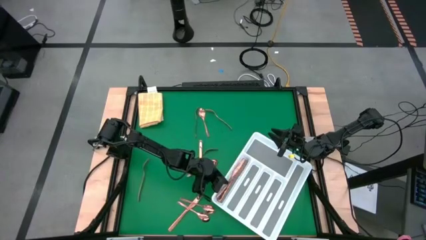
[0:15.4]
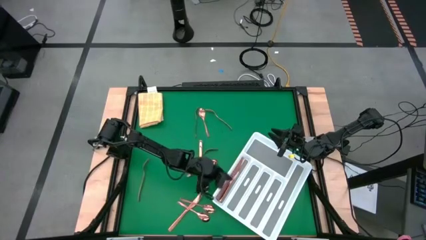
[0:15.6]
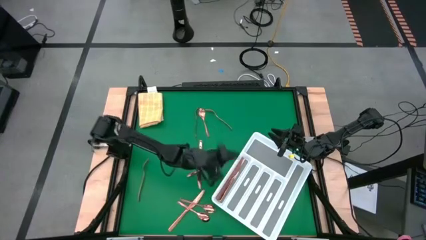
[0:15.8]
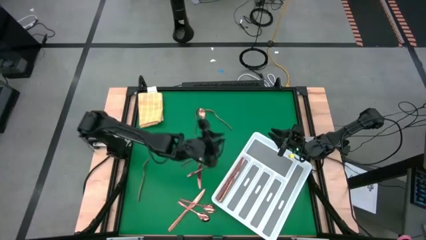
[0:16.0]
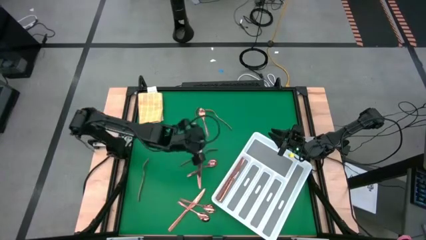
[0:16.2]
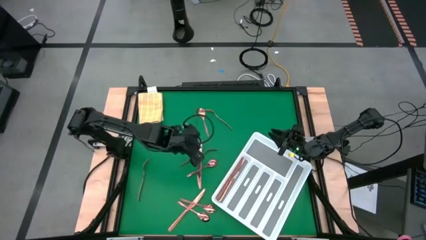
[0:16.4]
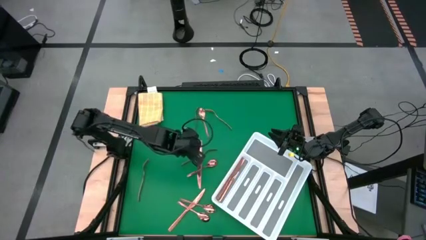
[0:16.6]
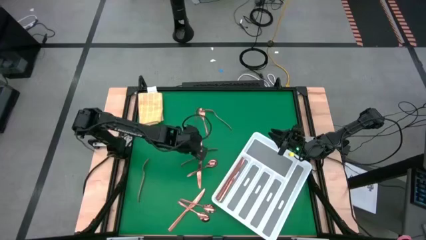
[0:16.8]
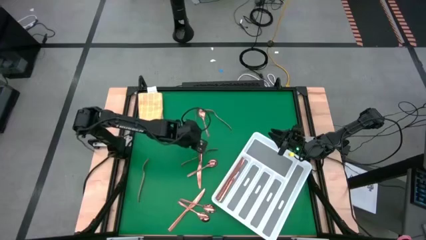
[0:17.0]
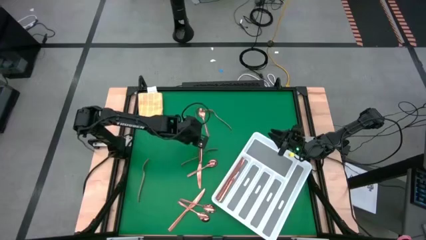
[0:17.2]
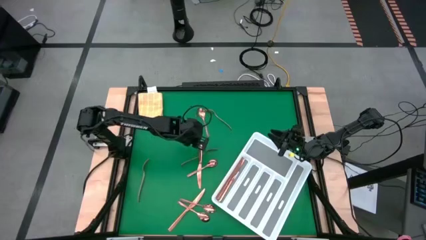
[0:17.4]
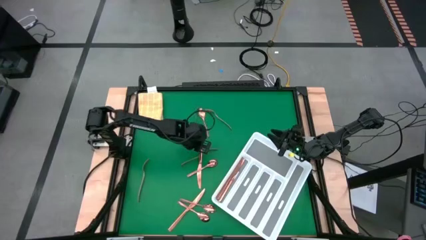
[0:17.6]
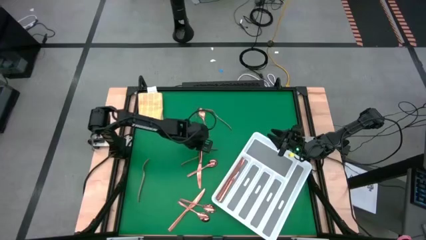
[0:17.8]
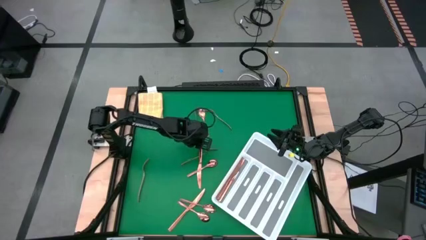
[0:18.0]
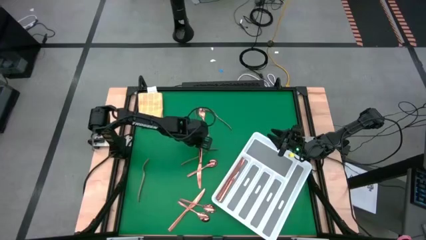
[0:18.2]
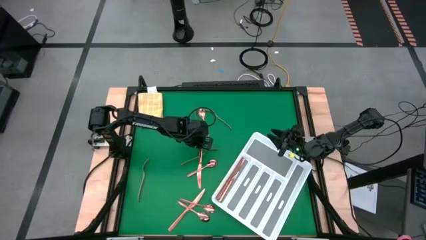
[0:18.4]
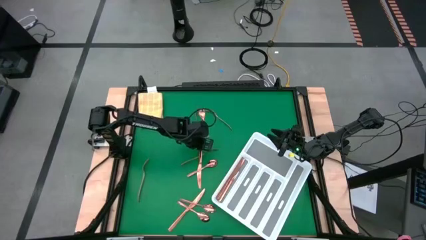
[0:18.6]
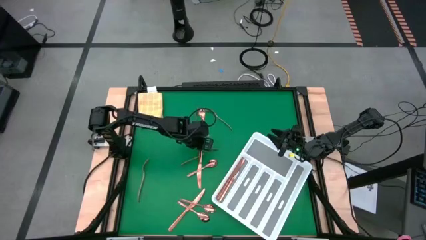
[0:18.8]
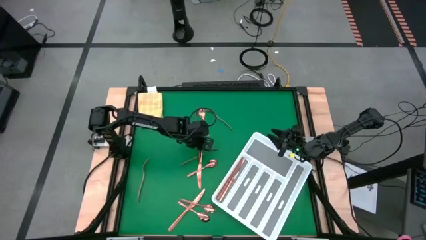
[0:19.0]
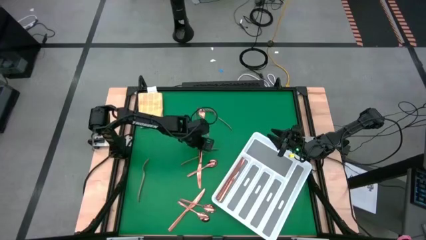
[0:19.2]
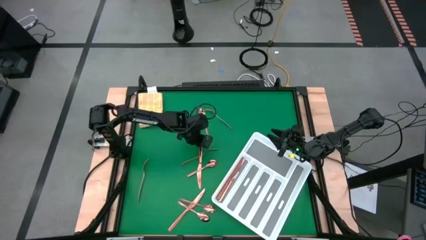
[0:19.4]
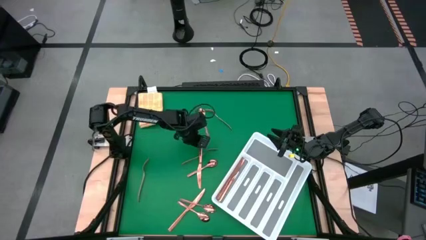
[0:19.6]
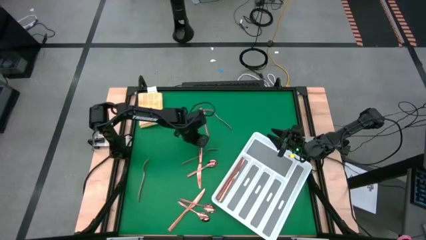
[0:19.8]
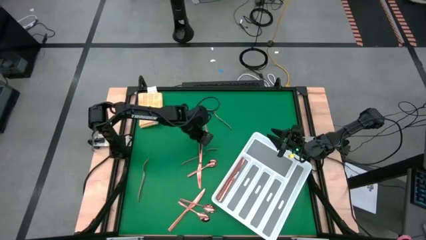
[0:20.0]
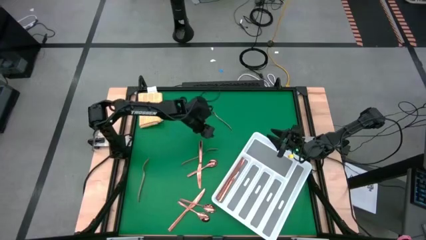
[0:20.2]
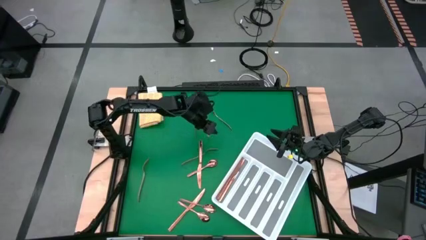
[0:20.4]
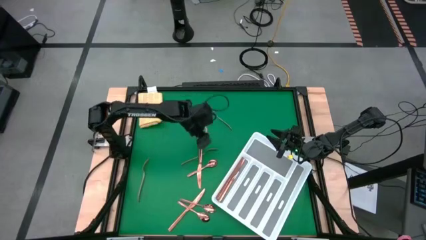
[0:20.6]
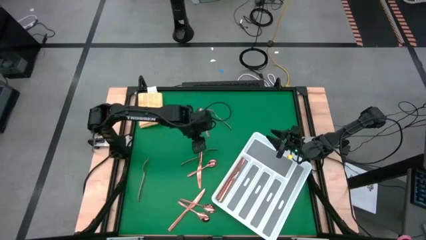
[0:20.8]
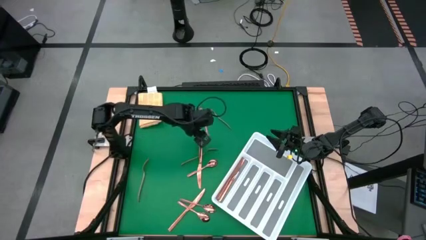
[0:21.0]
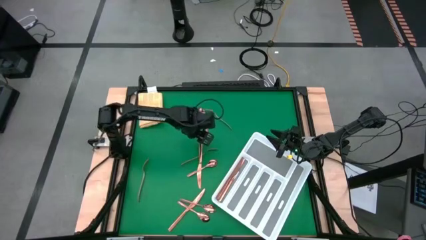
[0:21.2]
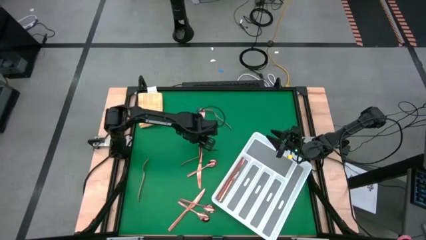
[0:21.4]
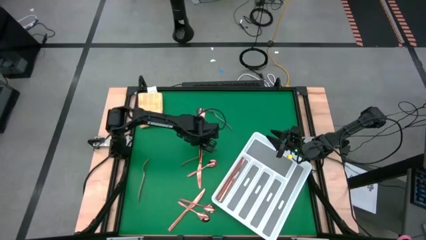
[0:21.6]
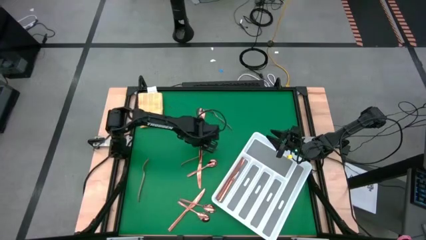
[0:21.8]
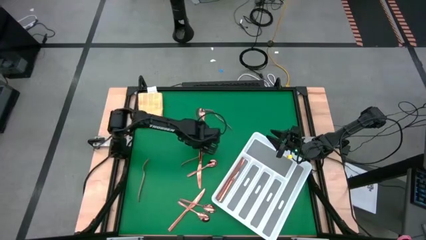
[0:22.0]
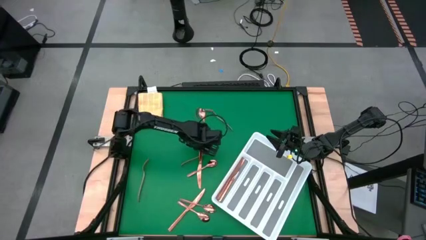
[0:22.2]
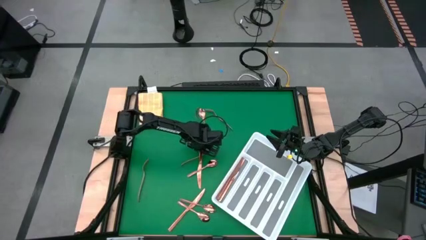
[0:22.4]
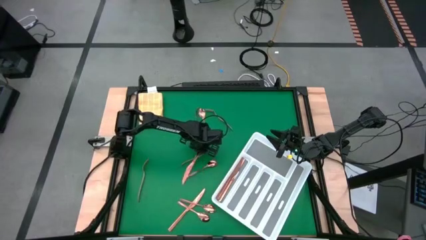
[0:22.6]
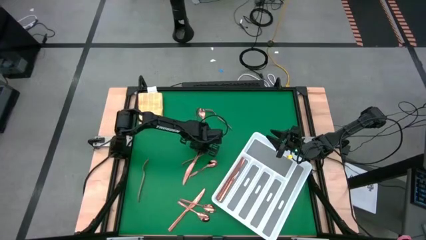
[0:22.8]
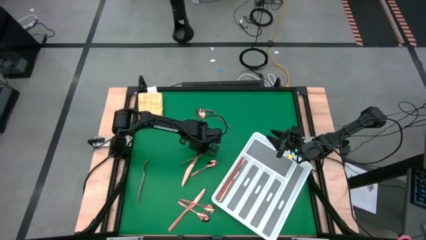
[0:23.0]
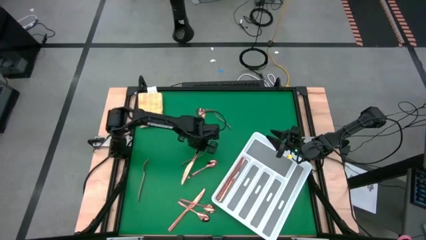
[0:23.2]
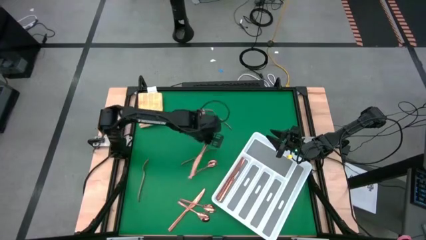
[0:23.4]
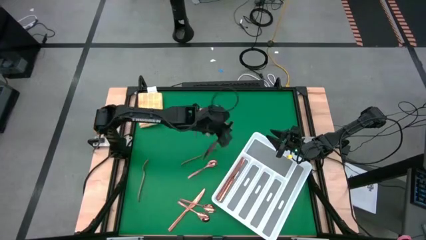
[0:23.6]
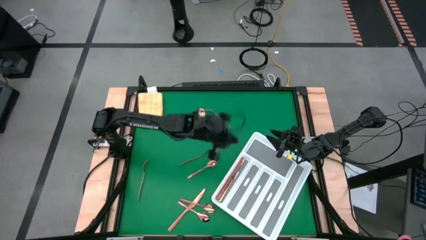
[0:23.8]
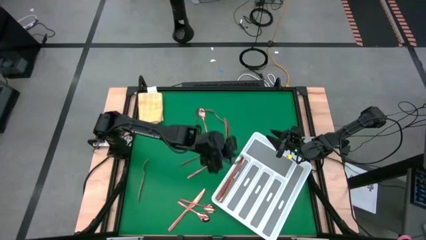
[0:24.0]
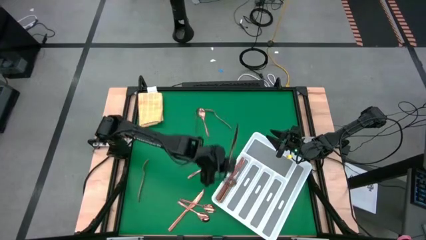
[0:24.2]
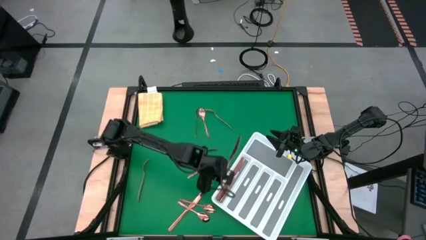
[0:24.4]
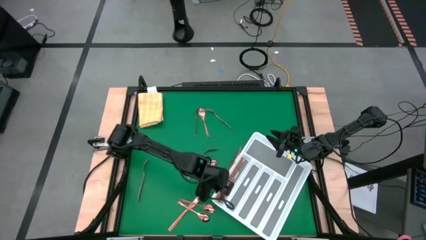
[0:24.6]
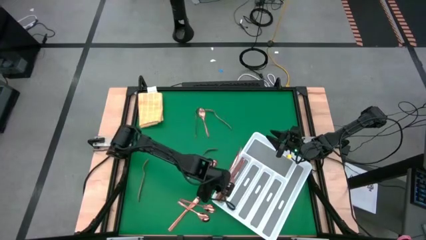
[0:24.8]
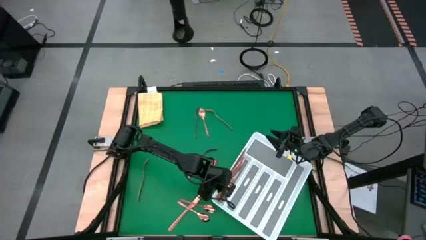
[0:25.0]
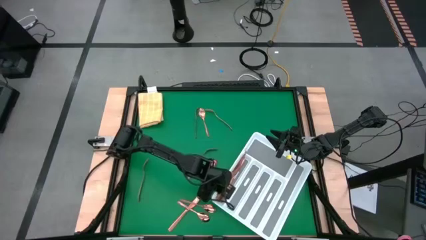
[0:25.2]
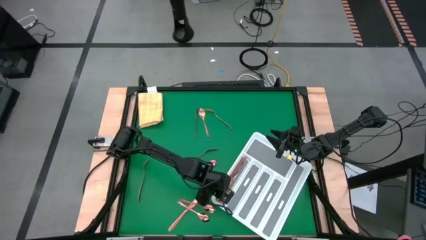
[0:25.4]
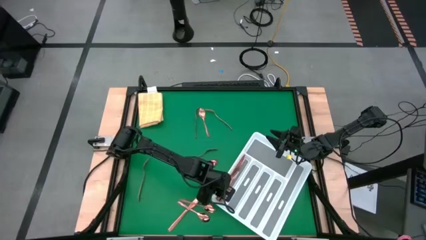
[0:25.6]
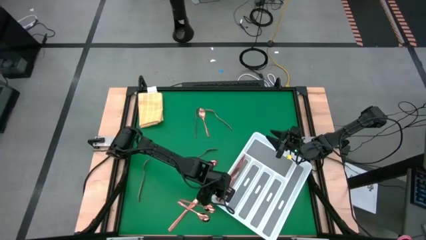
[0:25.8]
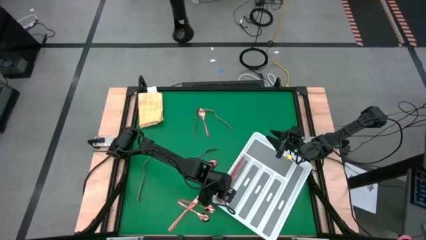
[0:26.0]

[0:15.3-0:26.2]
Task: Sort silverware
Put the gold table knife into the white cutlery tray

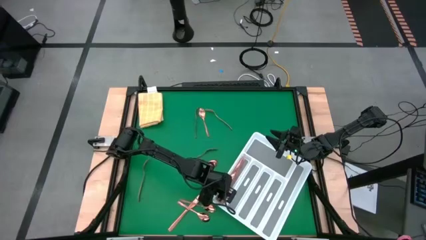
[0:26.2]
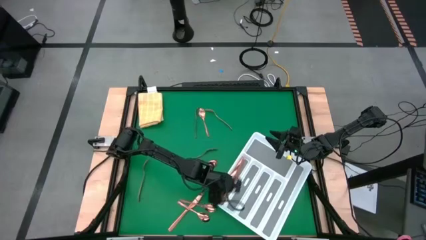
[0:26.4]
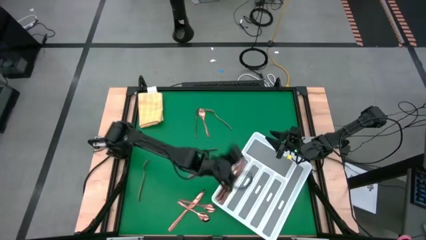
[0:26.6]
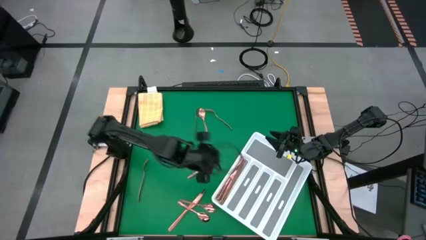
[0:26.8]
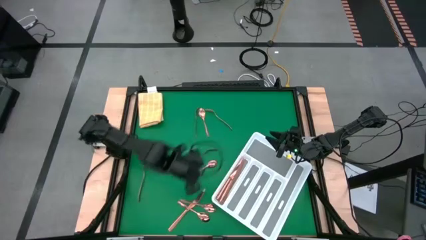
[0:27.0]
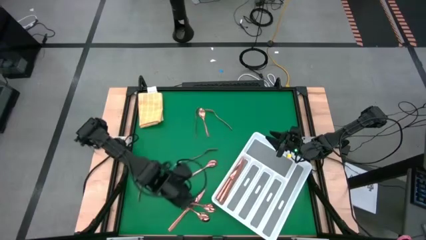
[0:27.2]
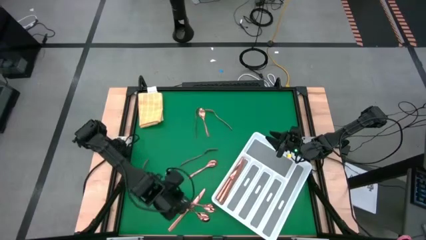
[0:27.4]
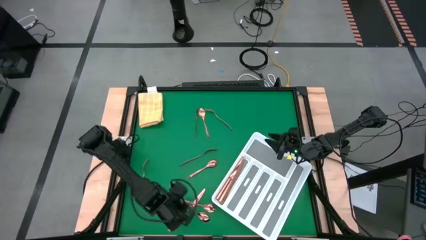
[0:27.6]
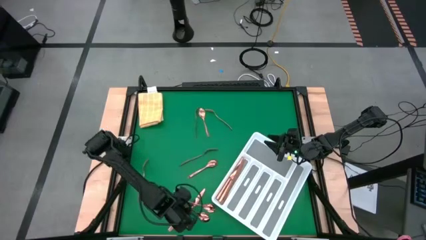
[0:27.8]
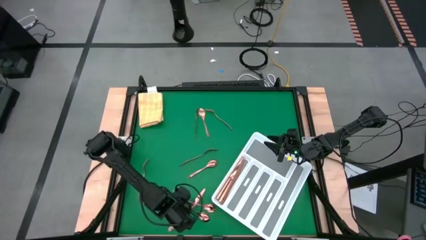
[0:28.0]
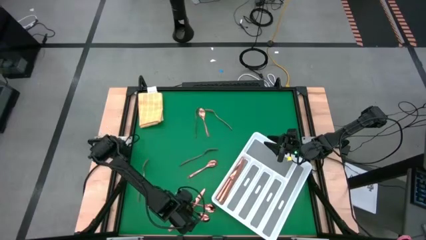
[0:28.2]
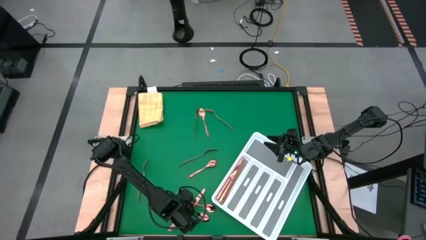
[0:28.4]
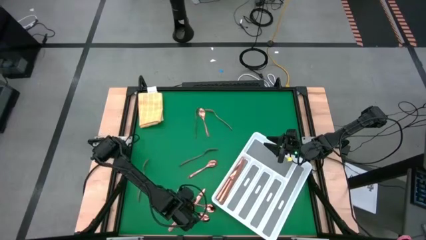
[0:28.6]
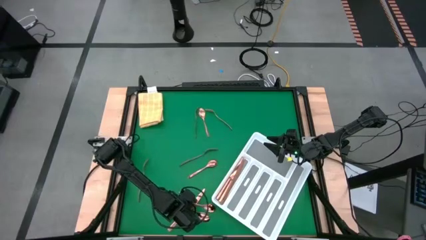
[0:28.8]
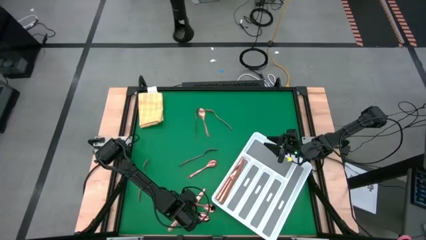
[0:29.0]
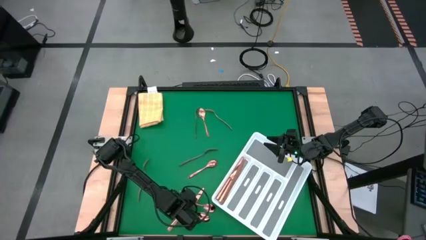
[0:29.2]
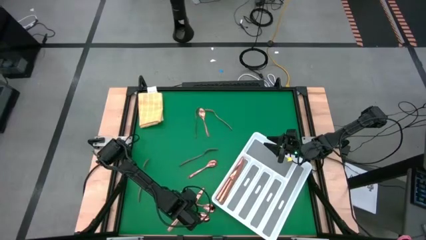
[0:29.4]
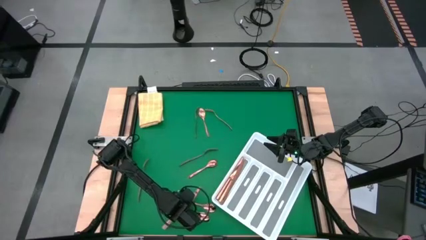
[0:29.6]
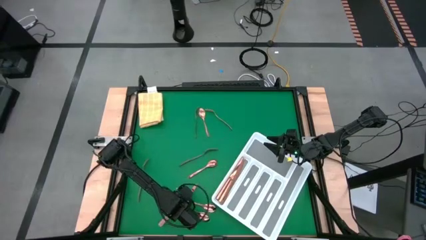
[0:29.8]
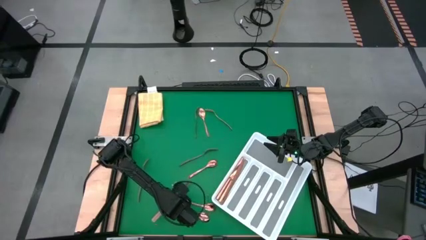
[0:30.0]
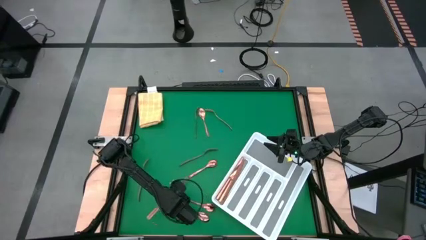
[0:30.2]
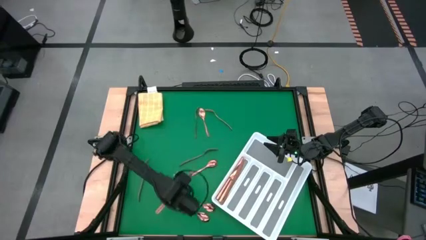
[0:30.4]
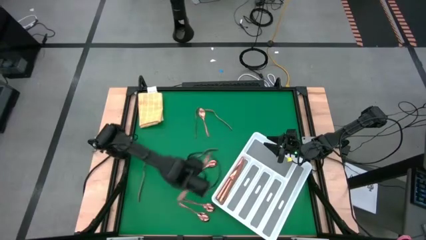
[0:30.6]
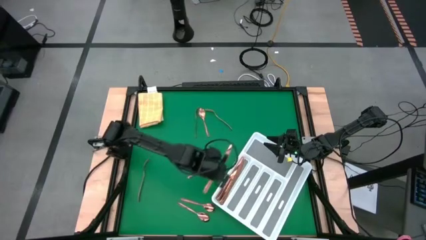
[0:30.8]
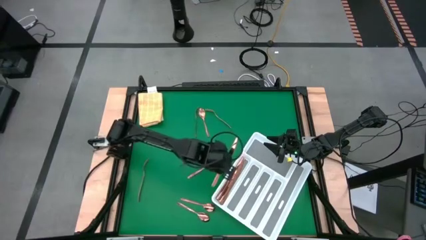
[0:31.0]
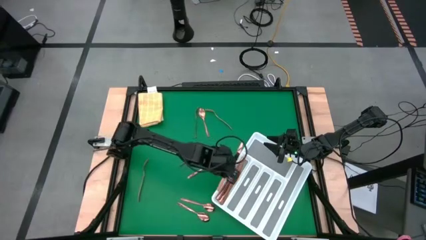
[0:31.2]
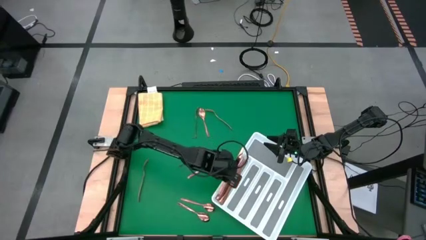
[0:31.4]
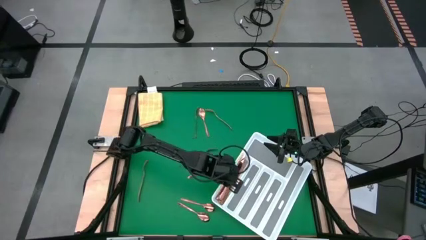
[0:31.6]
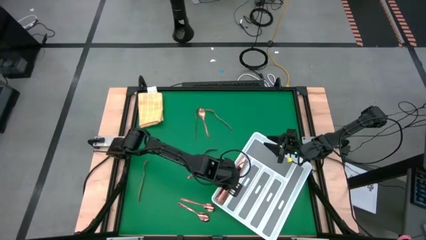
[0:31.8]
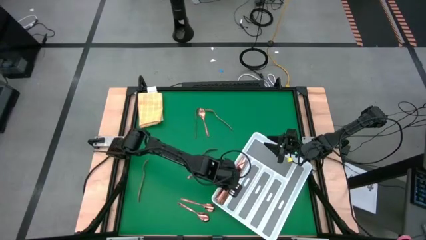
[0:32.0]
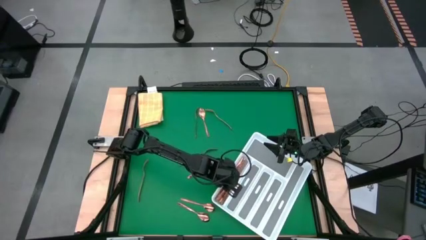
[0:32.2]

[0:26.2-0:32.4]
Put the gold table knife into the white cutlery tray
